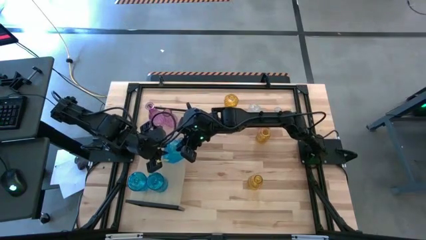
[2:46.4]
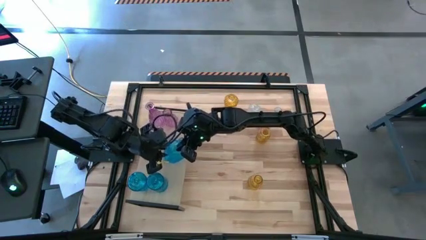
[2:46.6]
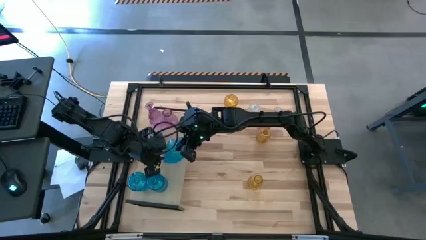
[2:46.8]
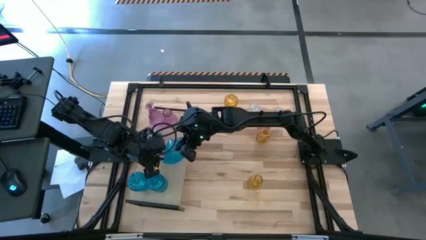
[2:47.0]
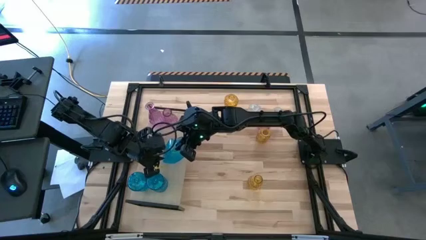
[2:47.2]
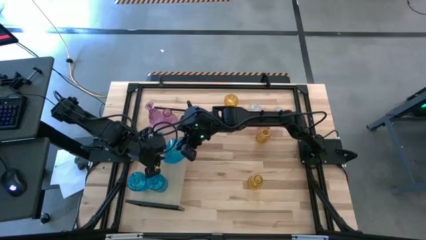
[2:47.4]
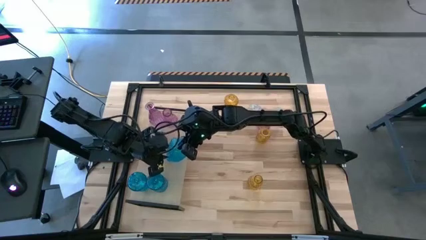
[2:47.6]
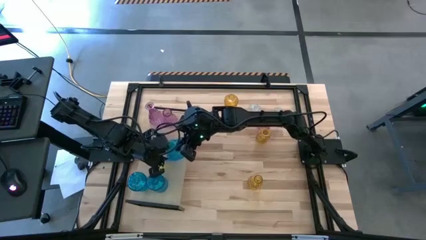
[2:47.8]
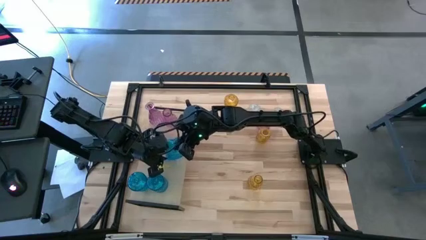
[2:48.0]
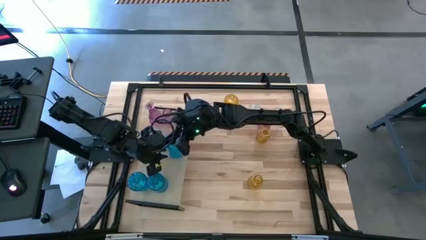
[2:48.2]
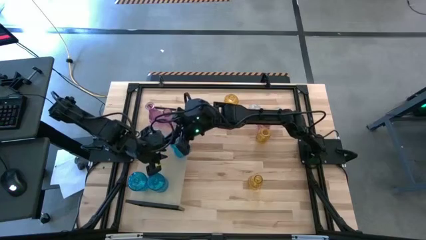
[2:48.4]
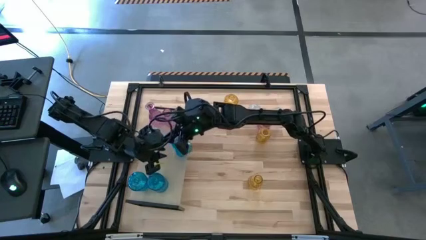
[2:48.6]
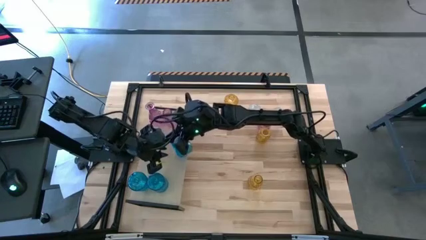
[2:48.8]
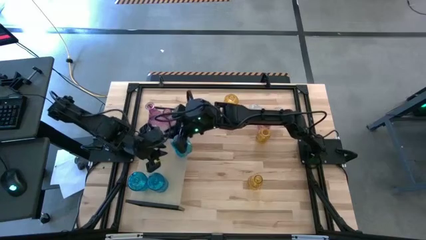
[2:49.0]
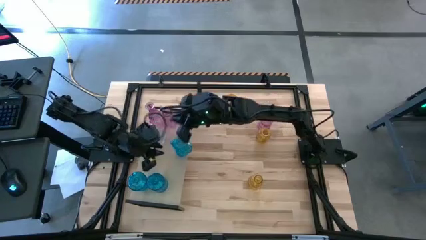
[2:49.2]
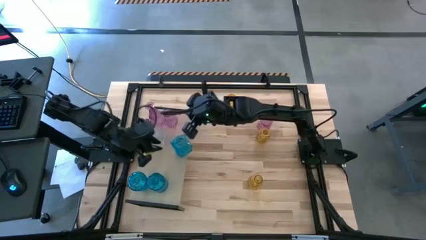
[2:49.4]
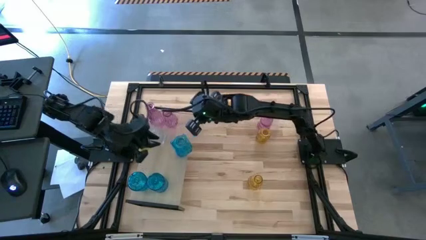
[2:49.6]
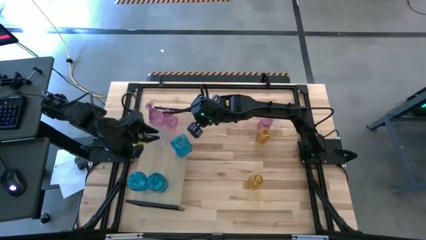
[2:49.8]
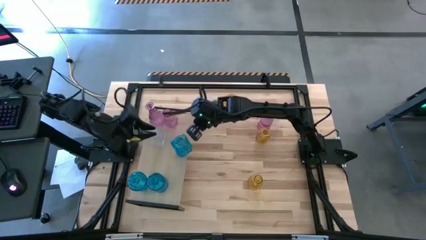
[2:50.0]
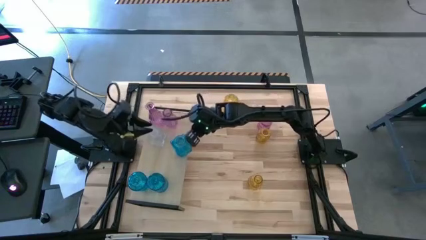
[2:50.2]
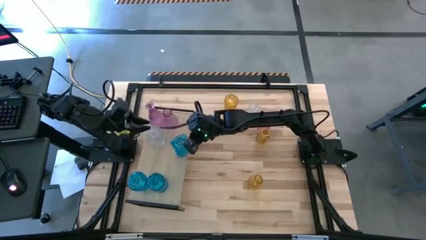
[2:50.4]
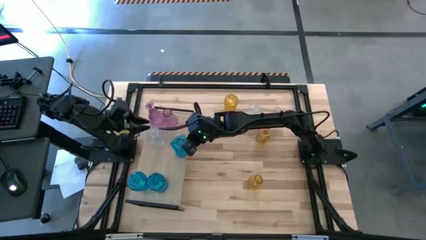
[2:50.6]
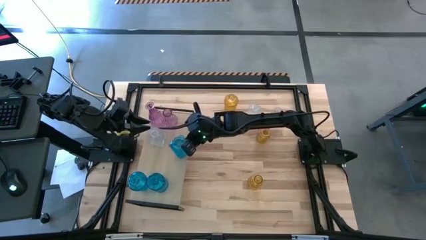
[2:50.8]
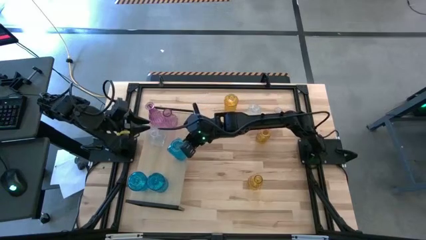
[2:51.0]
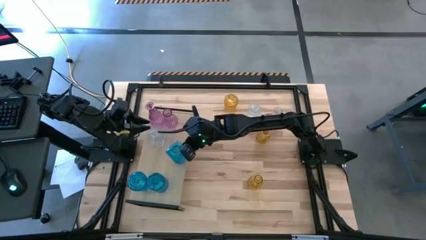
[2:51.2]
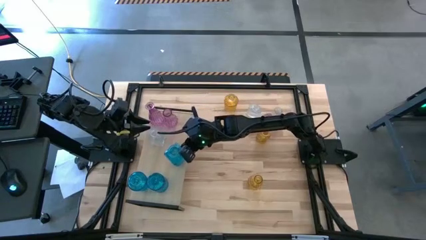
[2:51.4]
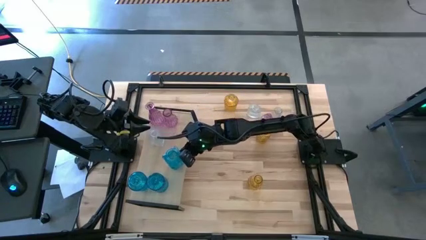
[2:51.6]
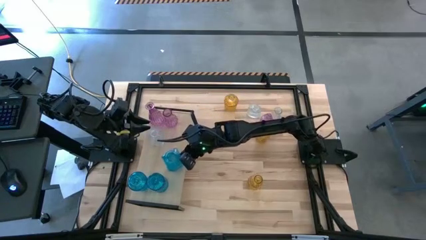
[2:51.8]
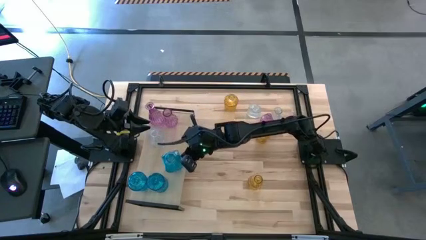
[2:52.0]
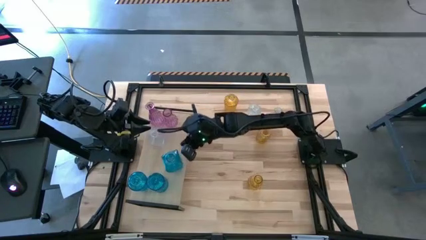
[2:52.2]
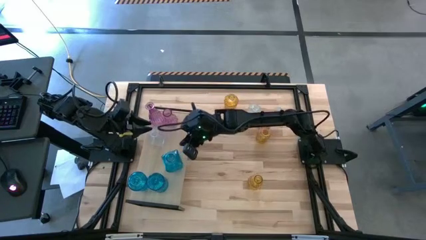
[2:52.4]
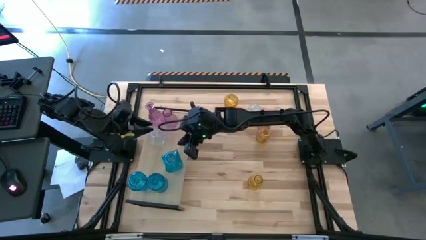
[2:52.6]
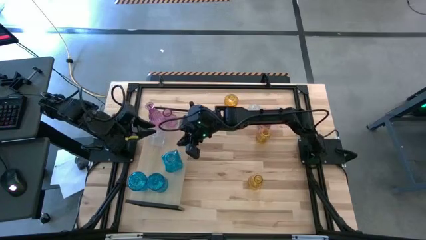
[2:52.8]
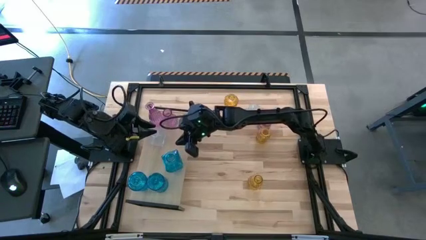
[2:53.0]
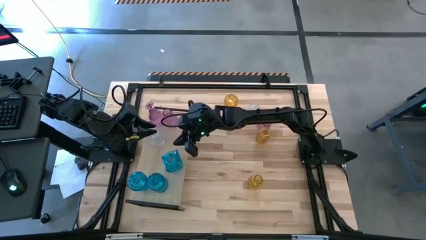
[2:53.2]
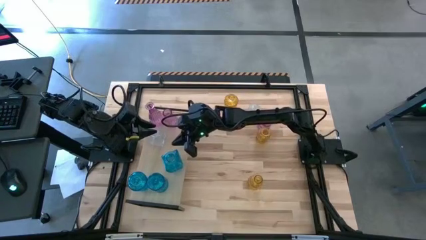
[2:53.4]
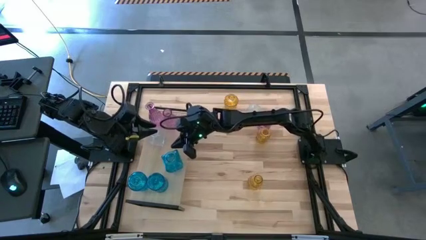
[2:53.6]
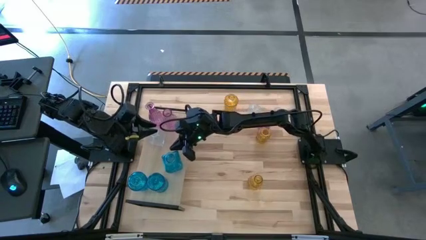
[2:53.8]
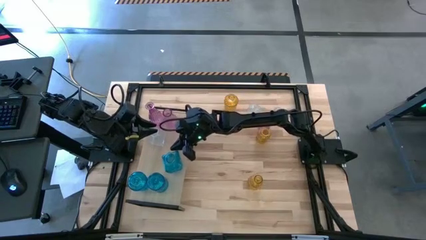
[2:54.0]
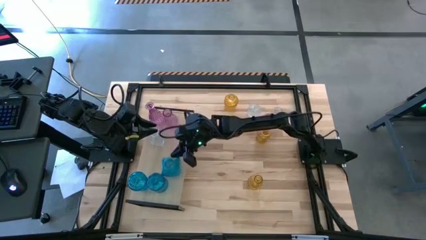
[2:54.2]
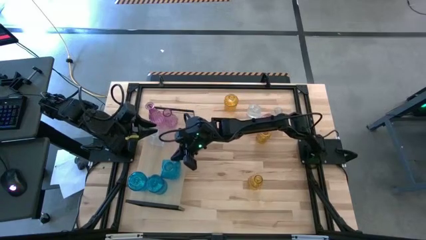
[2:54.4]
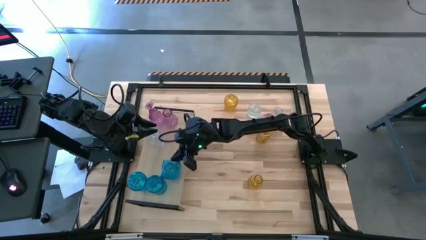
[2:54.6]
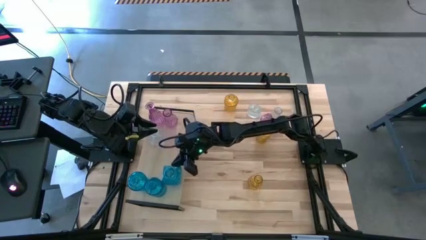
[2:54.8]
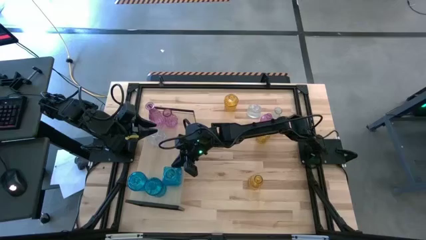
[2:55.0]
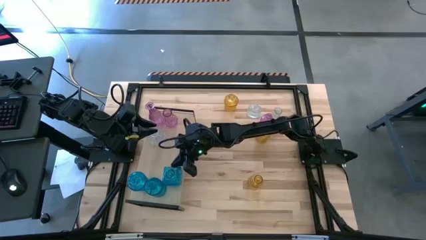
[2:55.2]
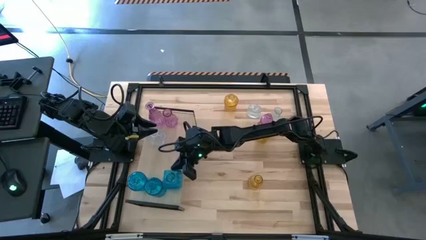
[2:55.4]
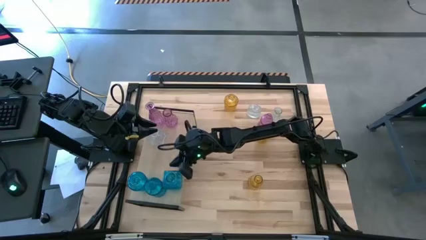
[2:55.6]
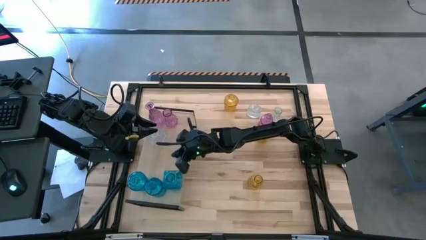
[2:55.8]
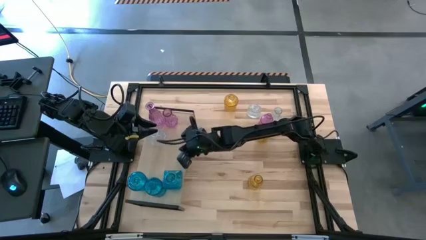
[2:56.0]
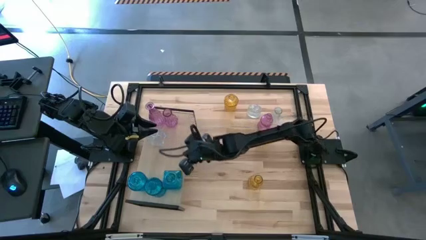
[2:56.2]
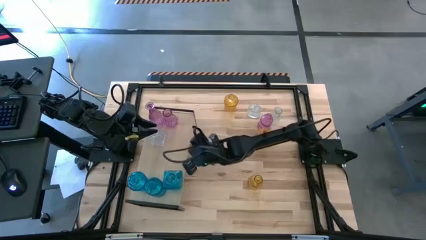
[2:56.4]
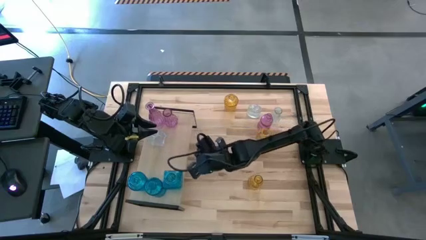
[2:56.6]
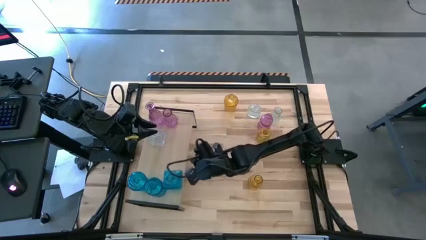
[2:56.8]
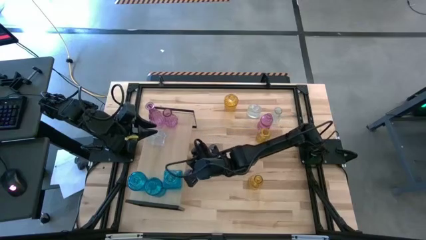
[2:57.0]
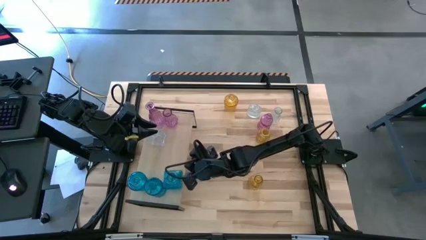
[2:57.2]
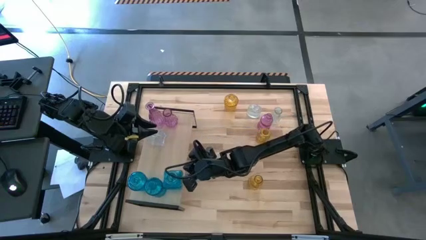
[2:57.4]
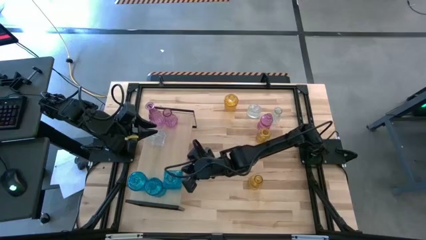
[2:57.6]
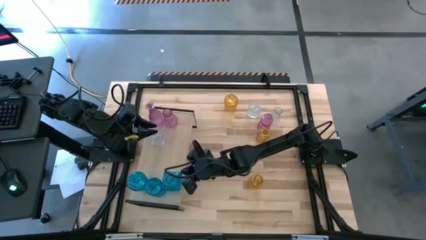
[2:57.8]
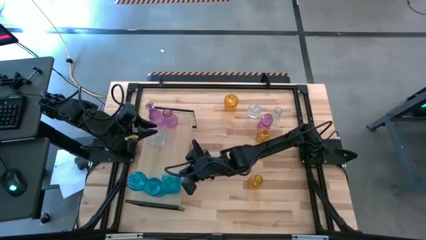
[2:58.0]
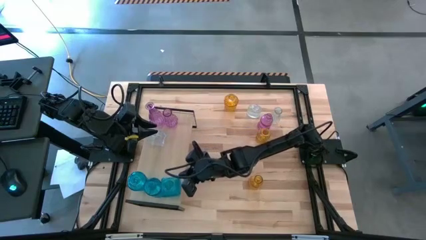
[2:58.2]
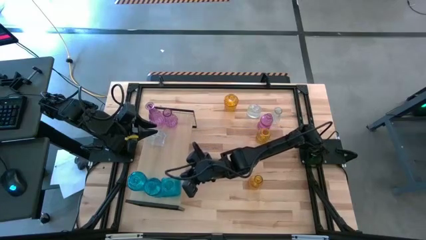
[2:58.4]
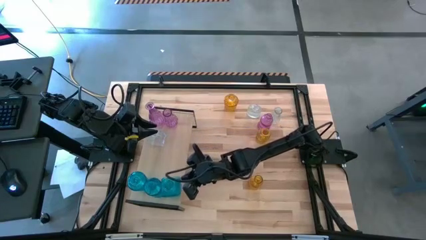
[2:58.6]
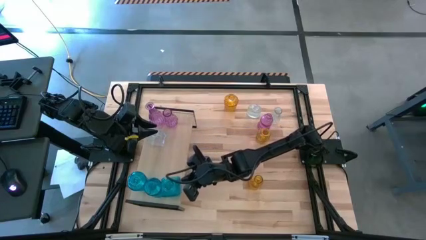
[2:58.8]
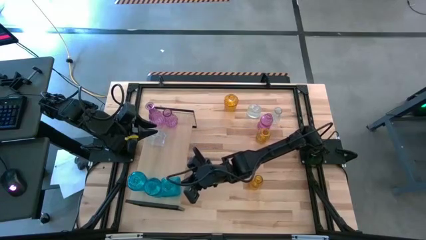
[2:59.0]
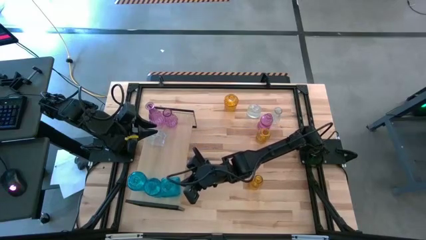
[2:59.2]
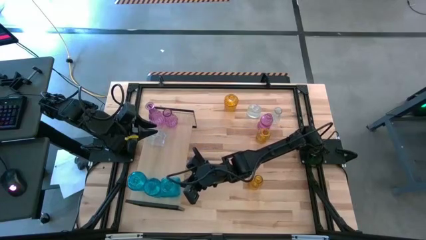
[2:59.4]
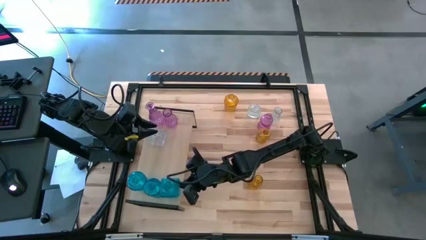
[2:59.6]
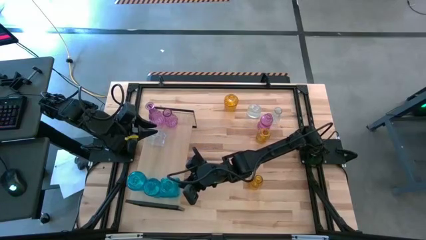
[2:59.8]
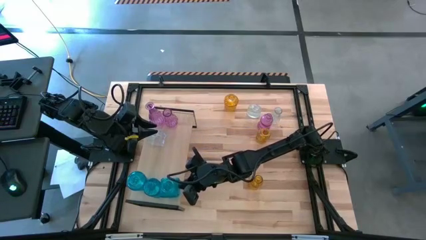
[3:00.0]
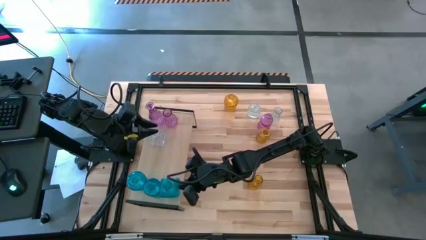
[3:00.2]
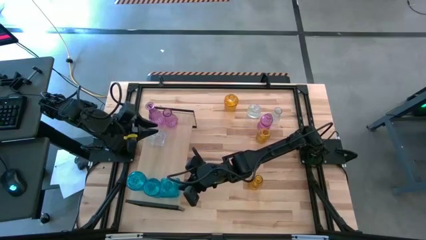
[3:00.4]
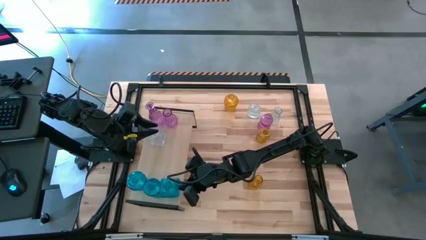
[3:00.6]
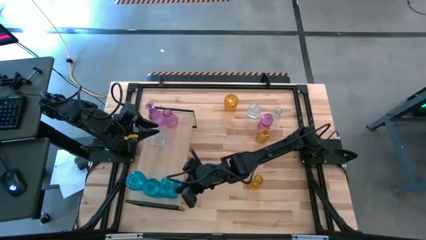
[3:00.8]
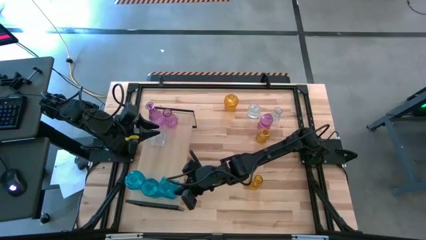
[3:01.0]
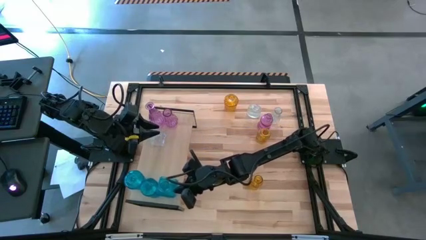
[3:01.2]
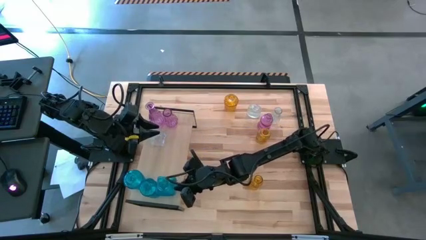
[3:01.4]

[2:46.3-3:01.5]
Task: sort vases onto shelf
Put the blue flower vase on the shelf
